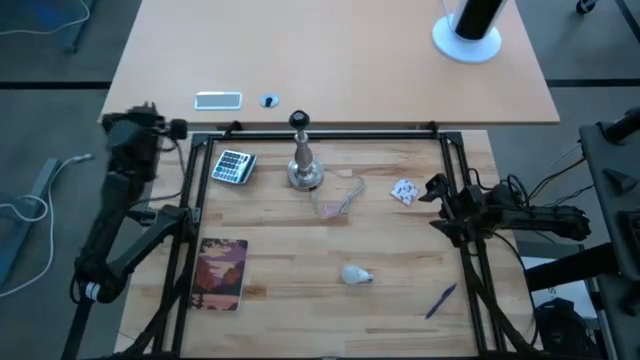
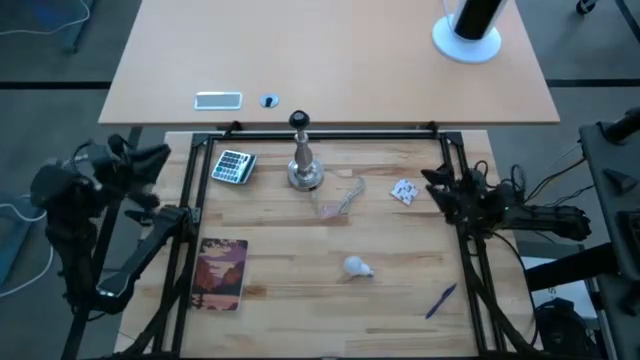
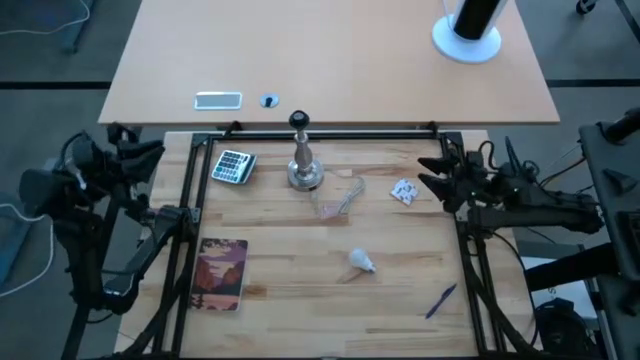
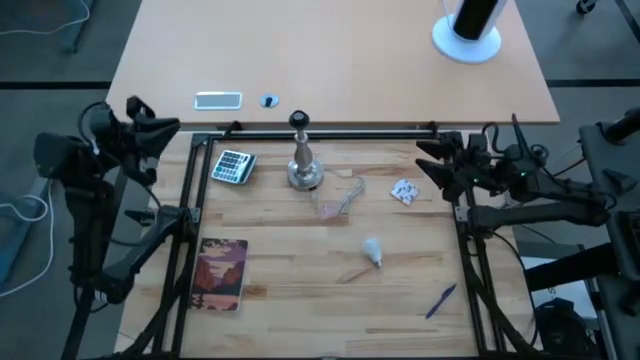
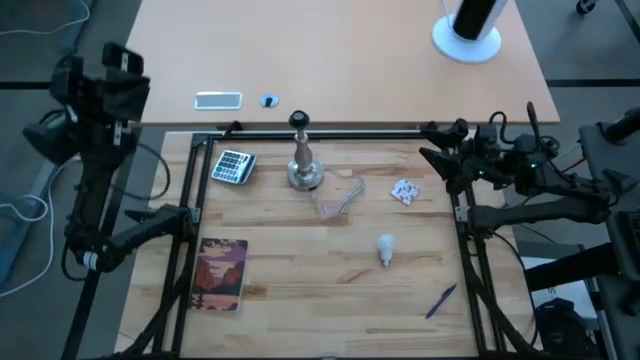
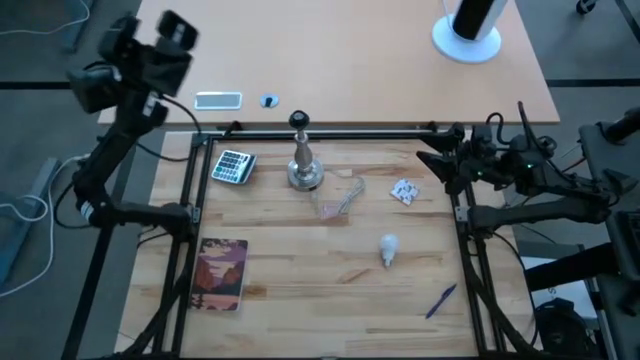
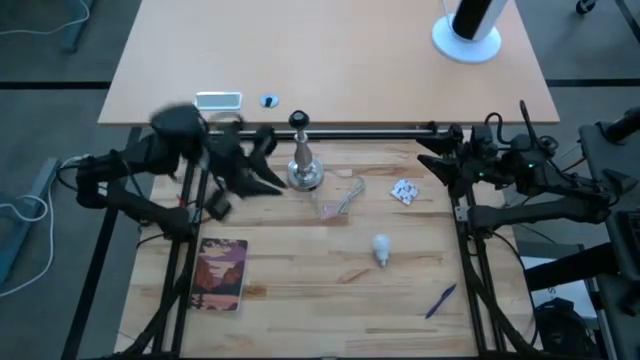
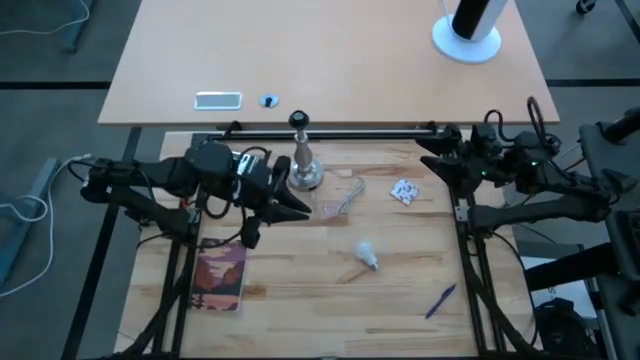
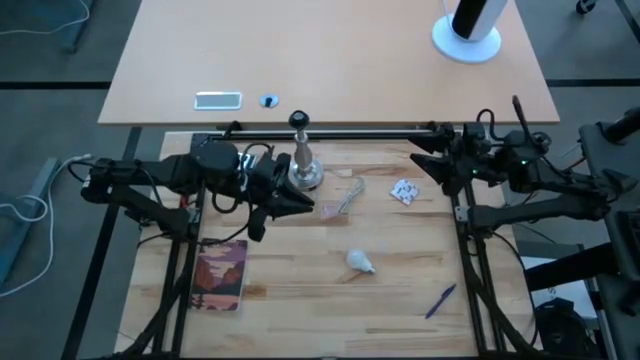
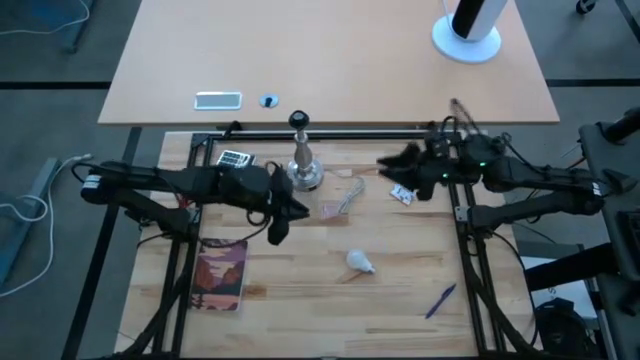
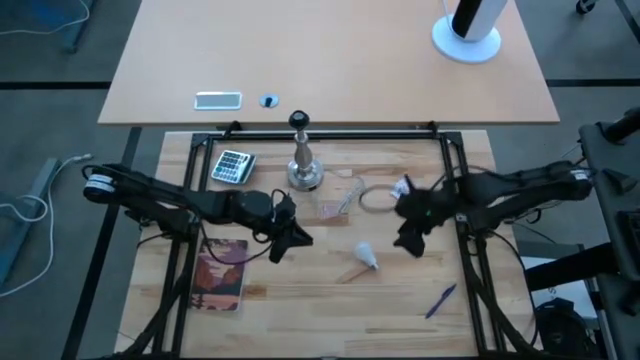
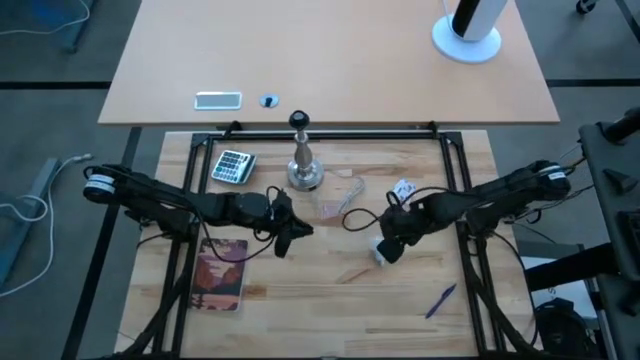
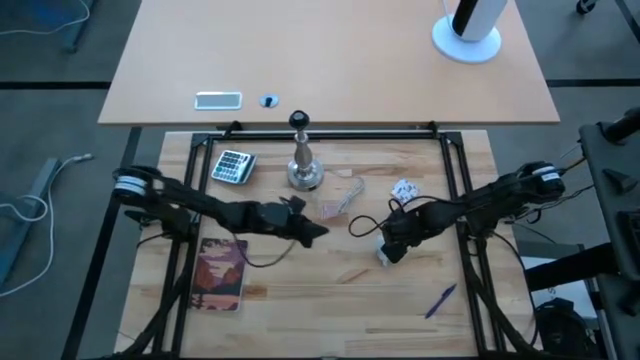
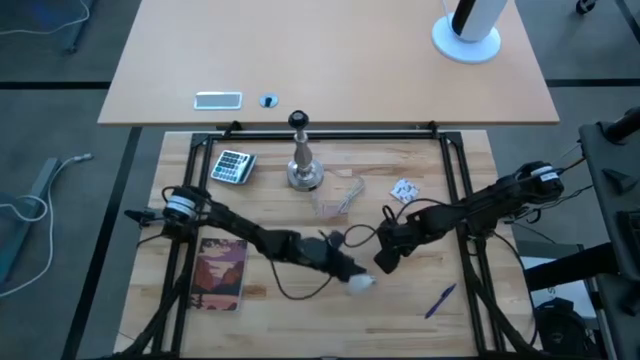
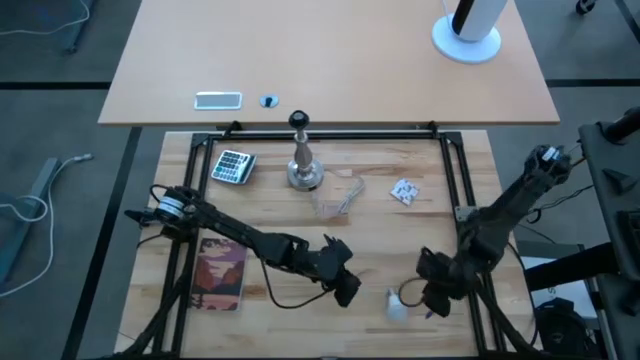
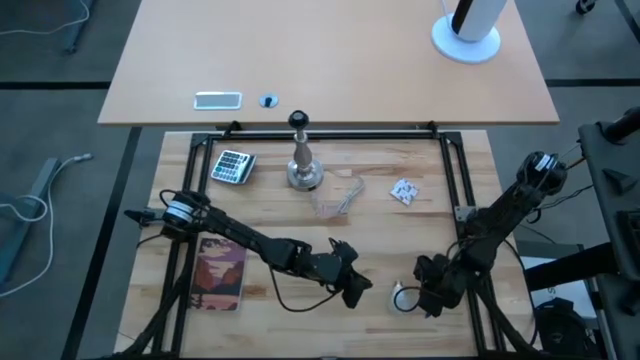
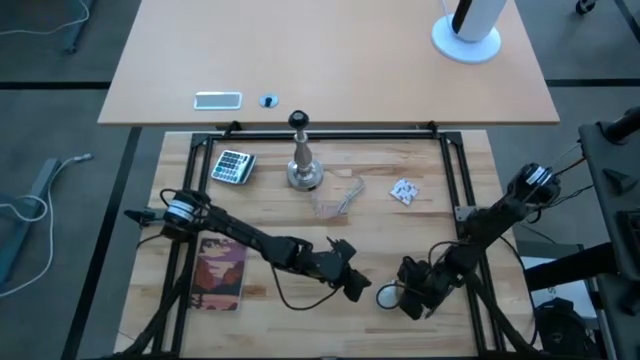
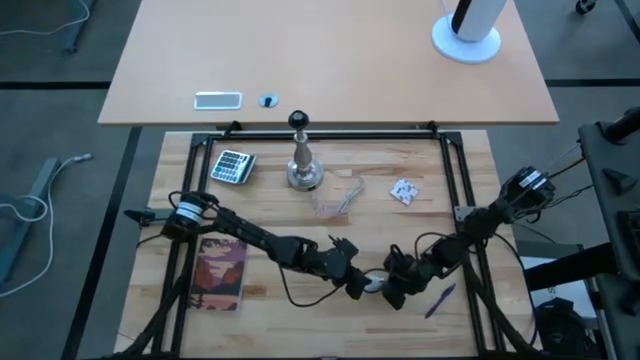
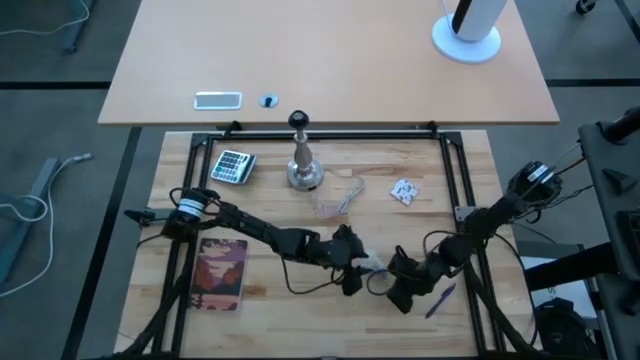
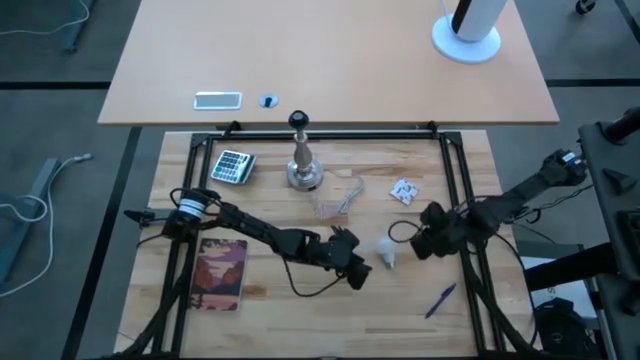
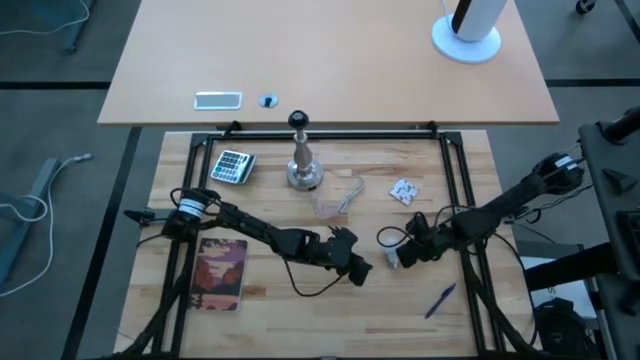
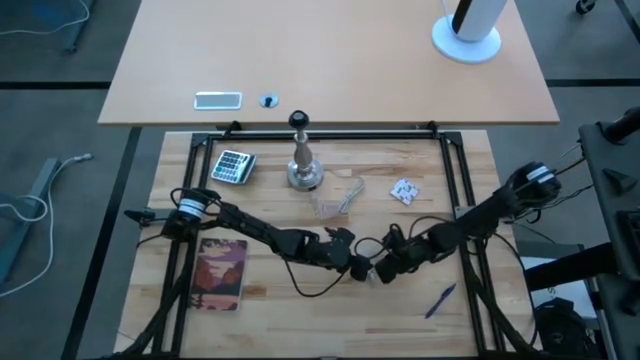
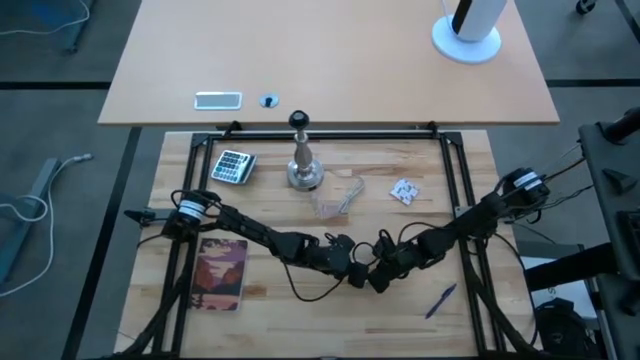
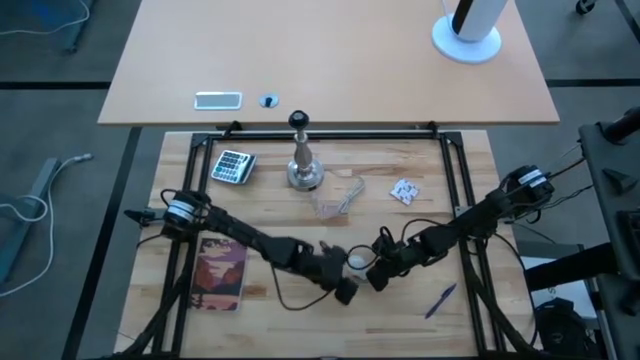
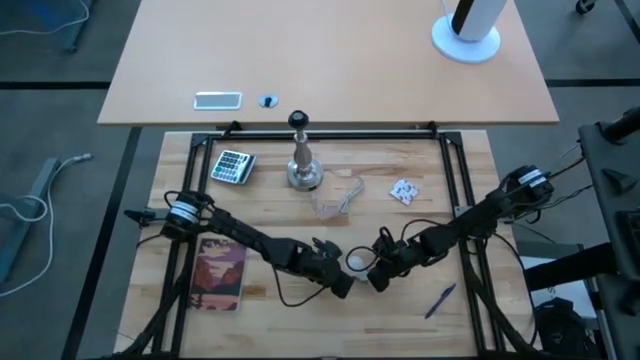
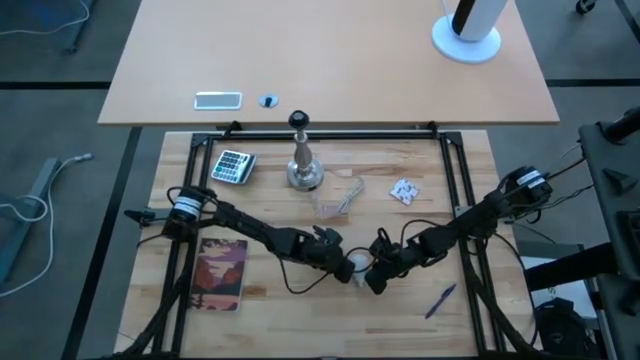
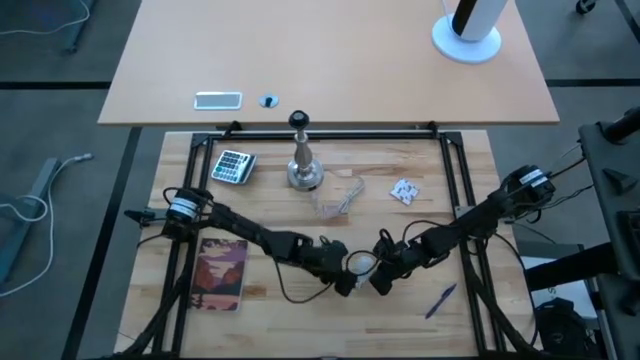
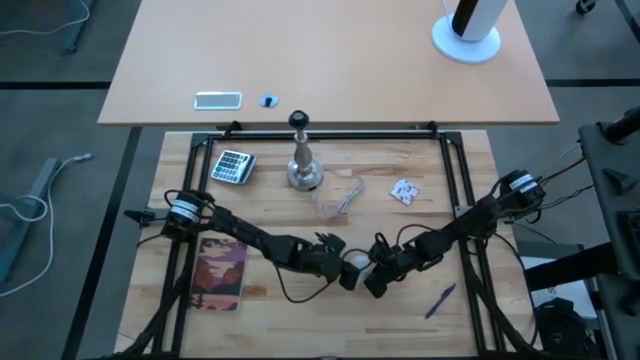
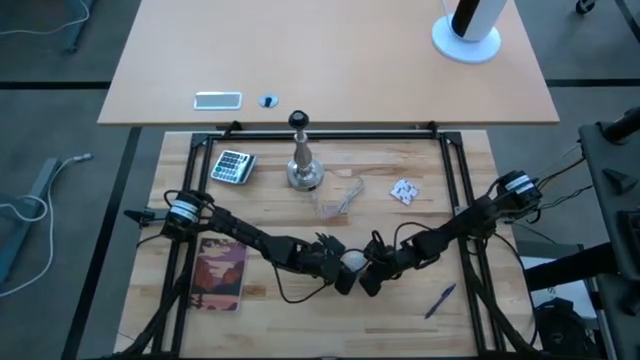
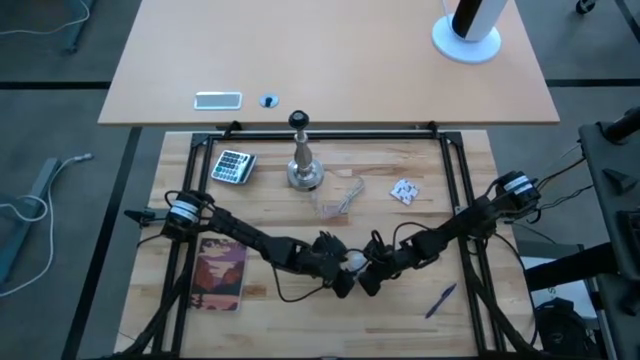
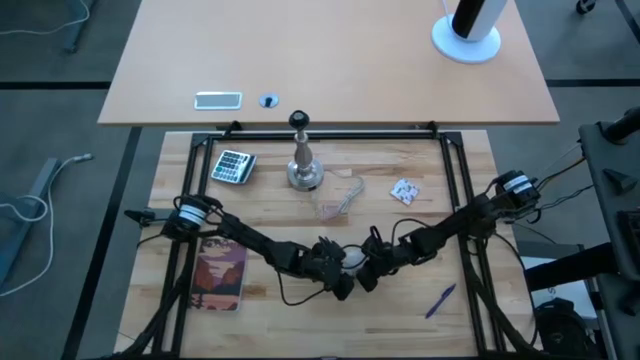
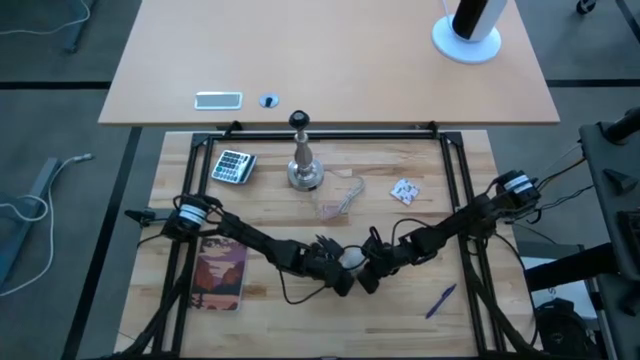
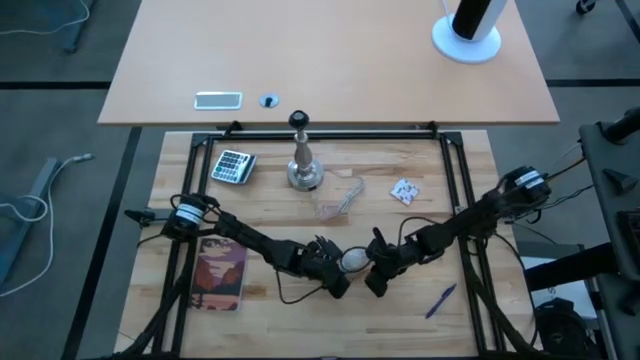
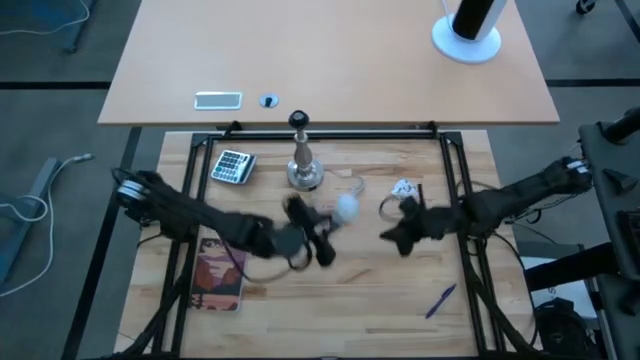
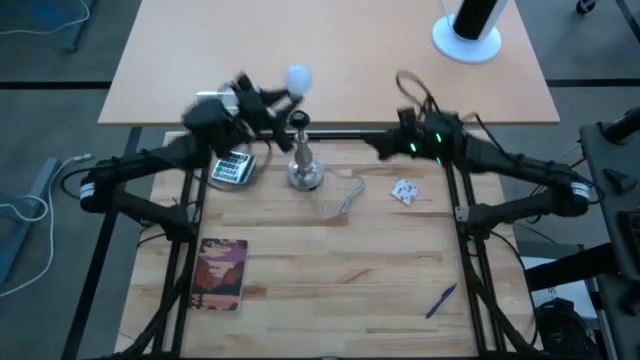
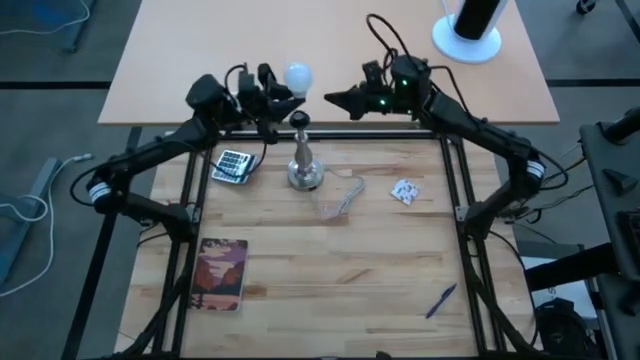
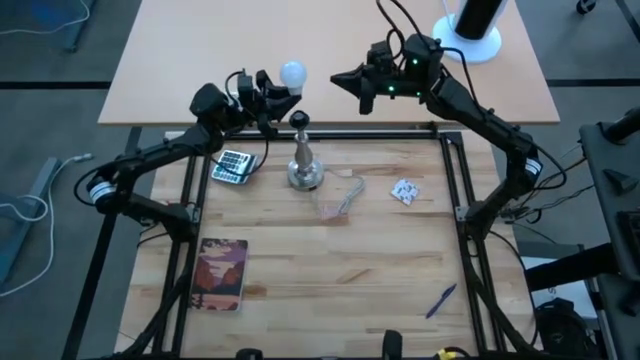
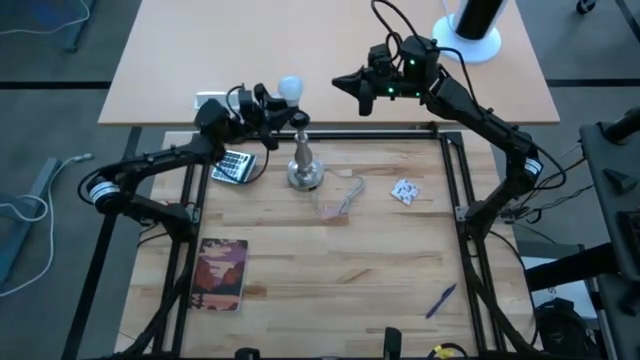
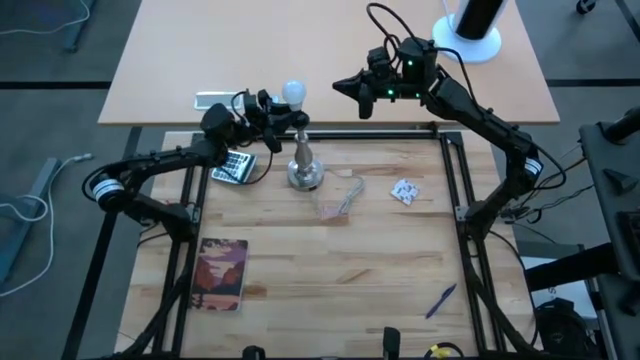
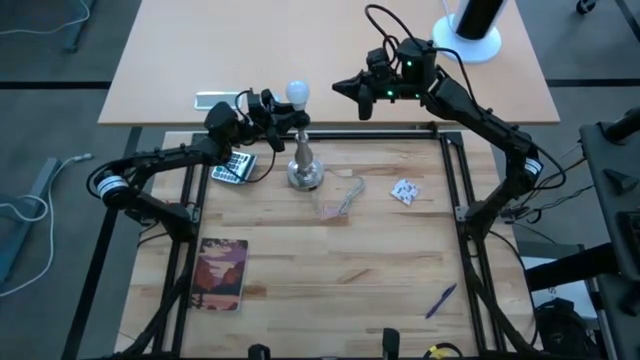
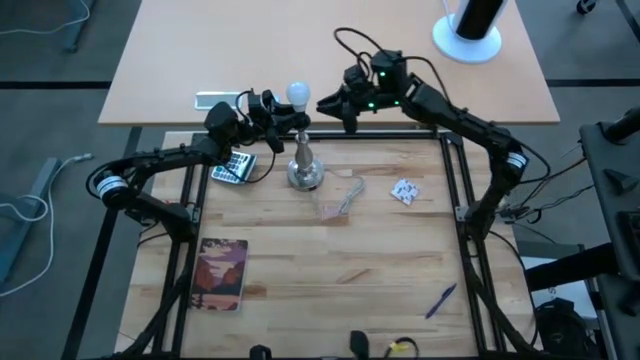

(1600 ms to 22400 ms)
Task: Screw lightbulb
Insert the lightbulb into the lamp
